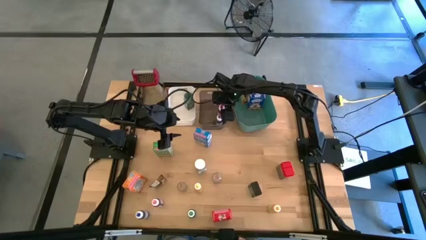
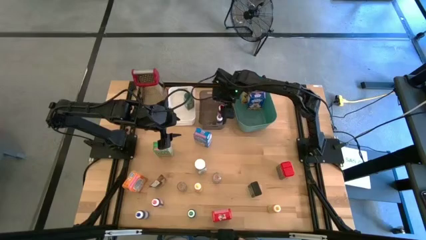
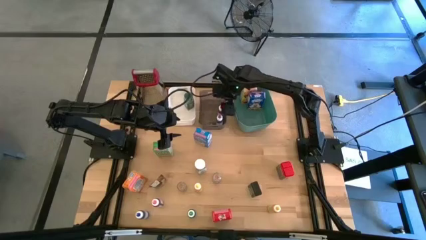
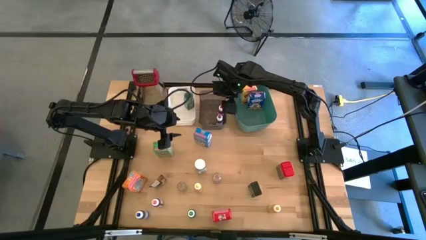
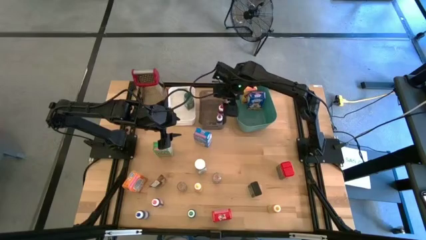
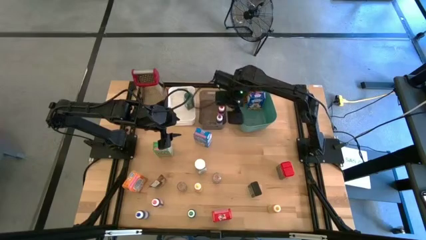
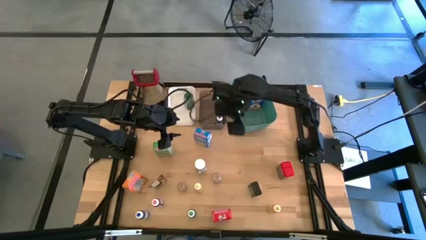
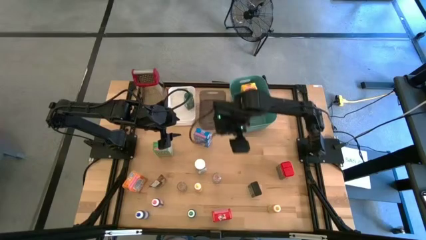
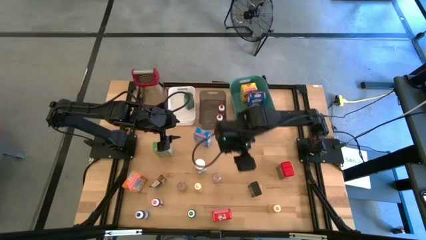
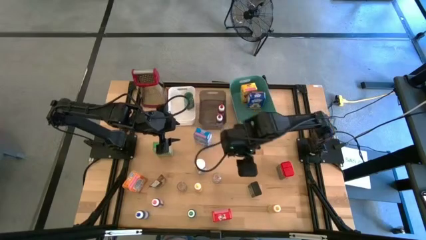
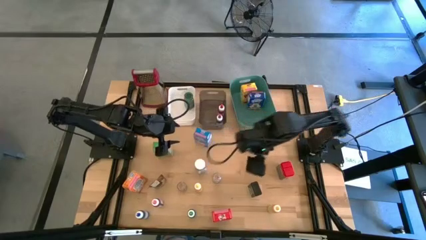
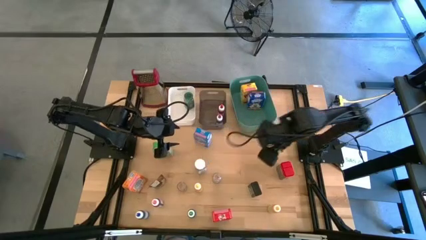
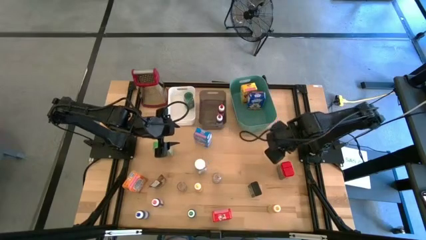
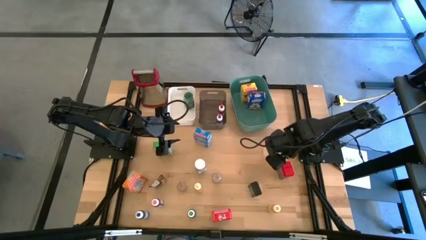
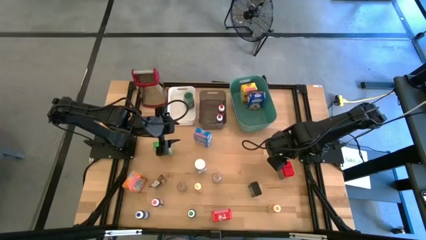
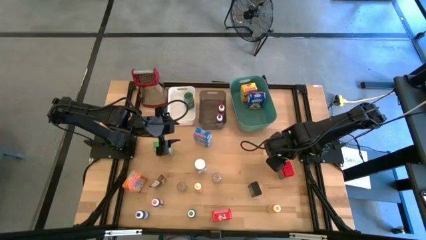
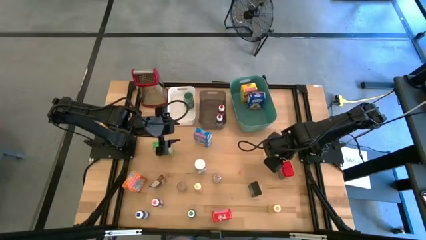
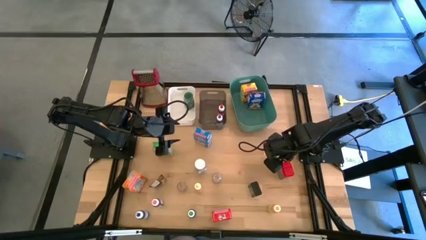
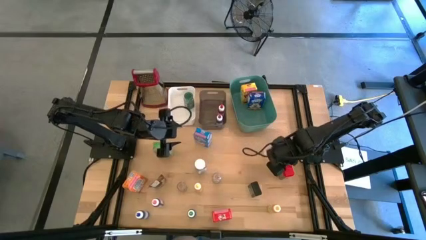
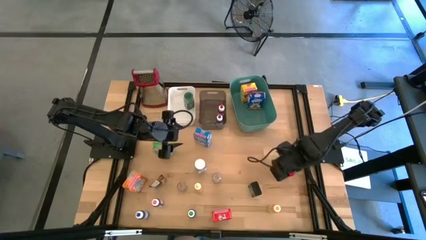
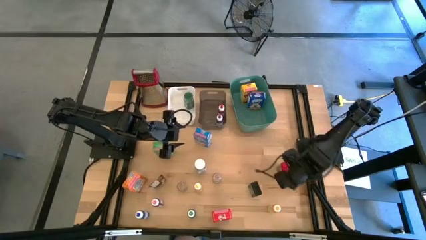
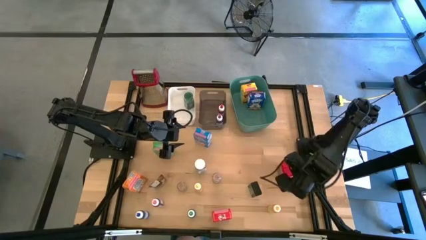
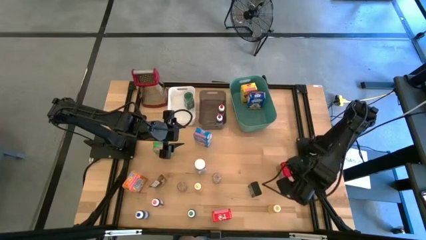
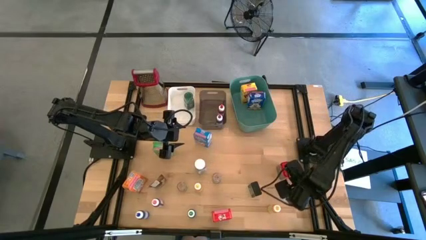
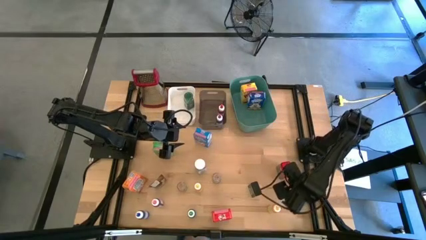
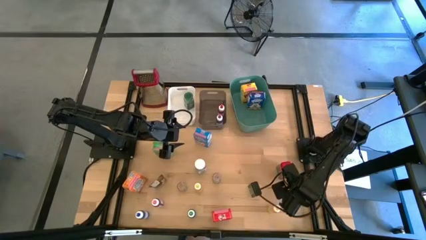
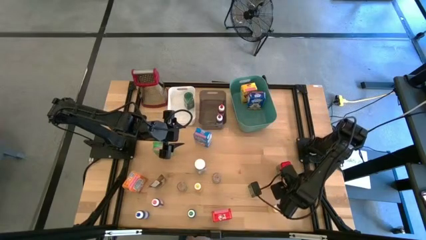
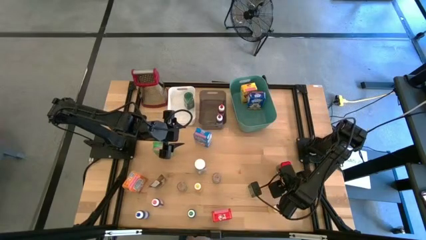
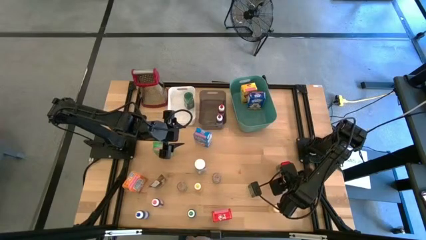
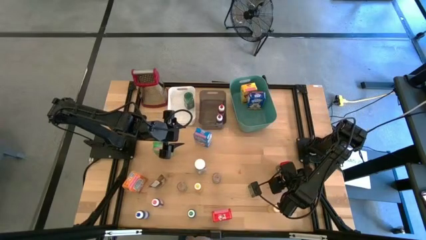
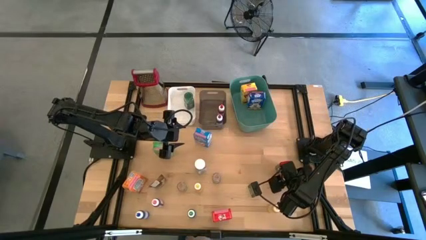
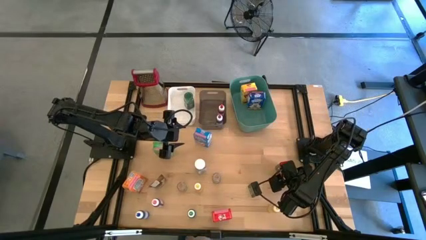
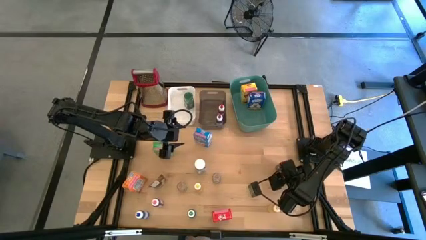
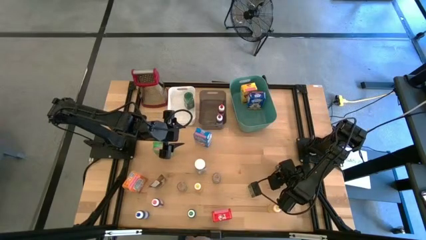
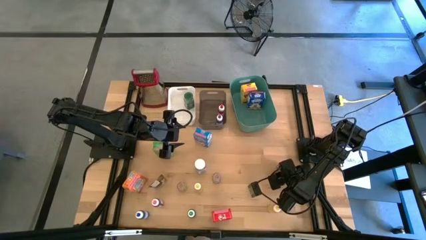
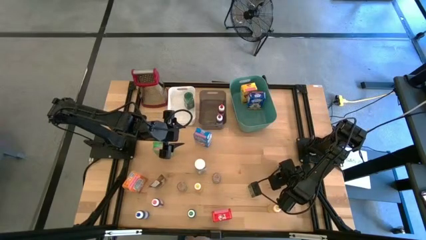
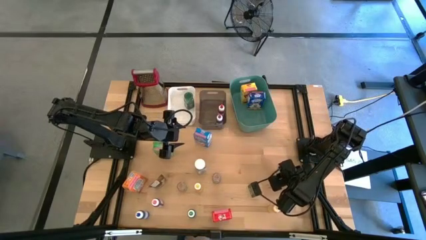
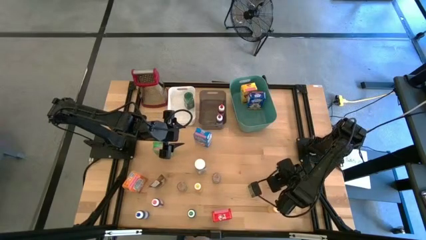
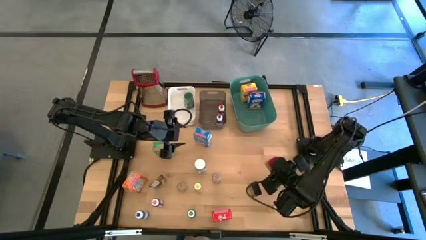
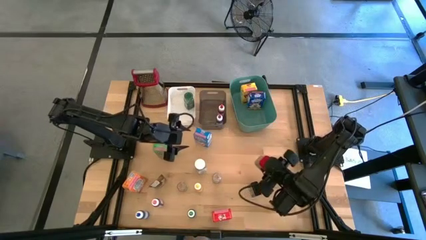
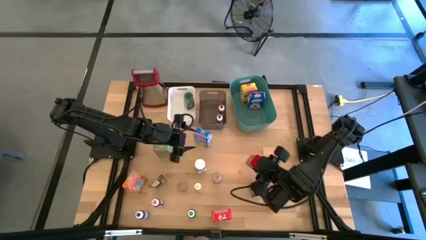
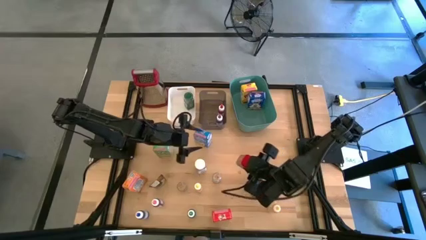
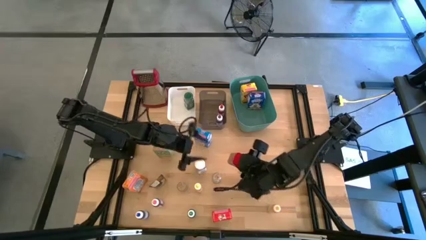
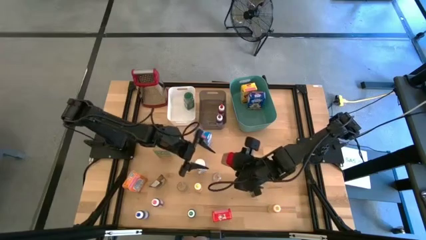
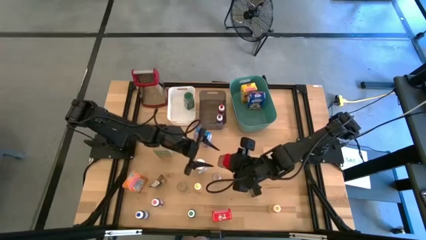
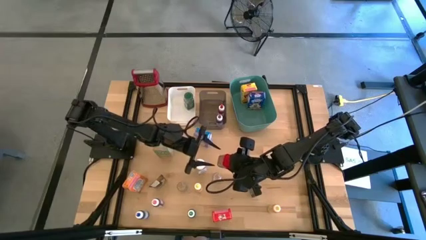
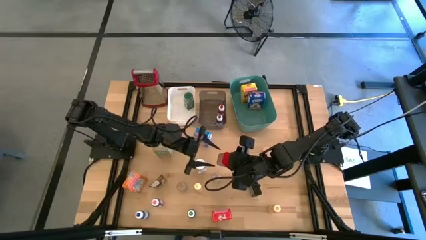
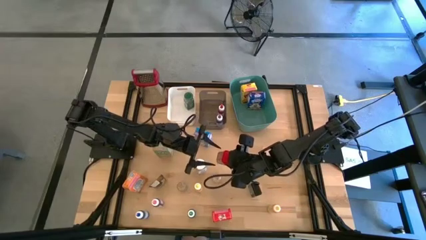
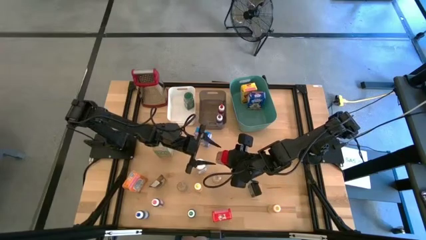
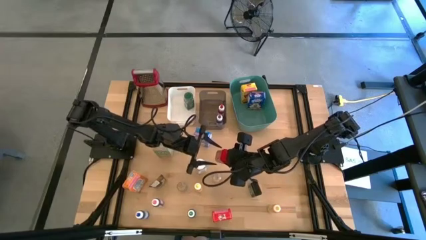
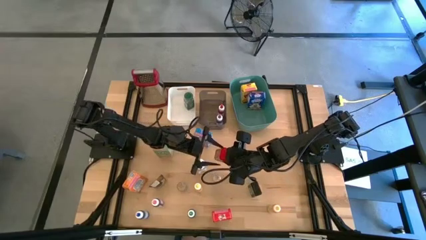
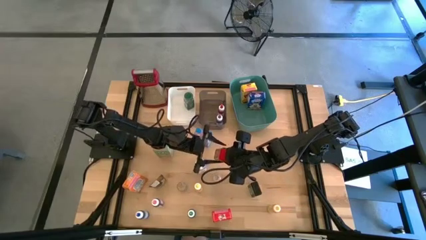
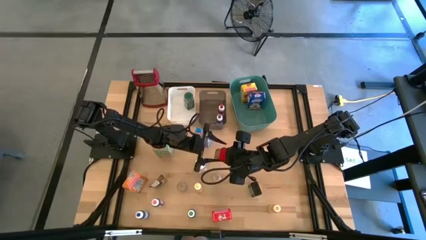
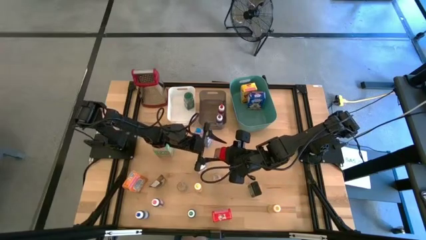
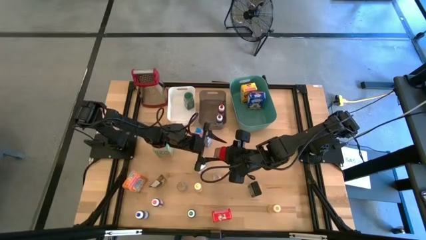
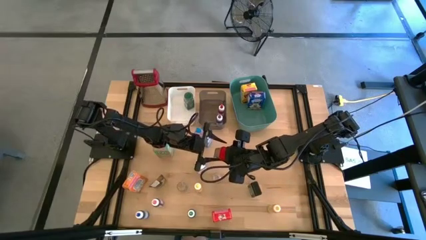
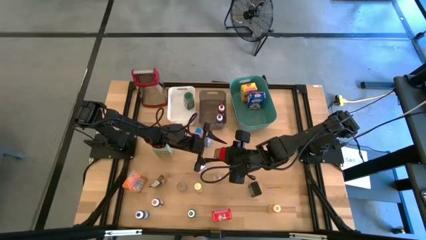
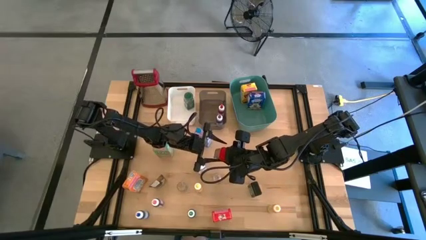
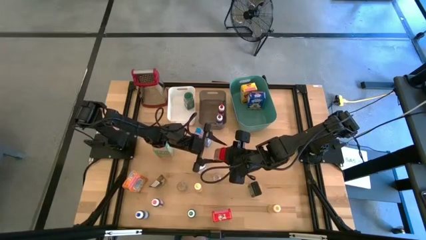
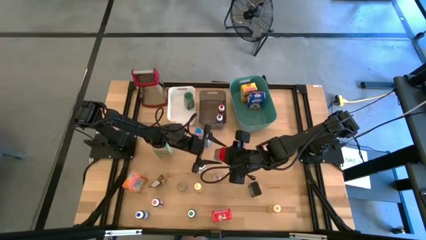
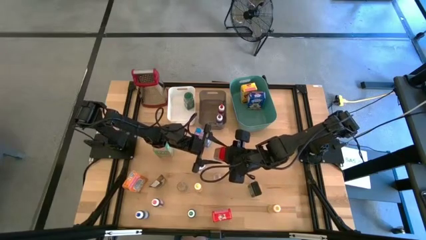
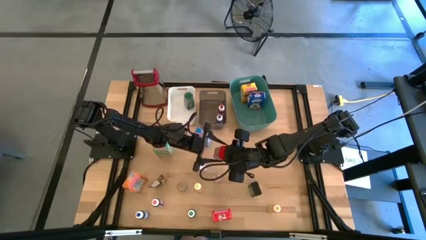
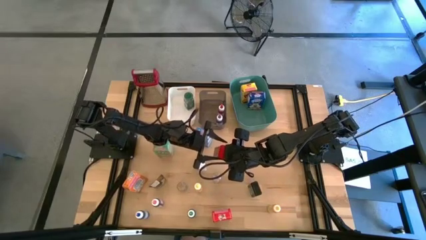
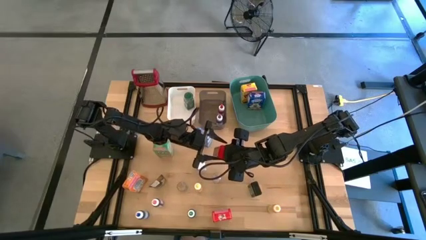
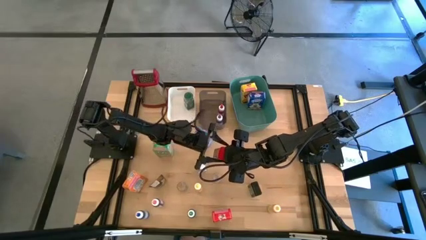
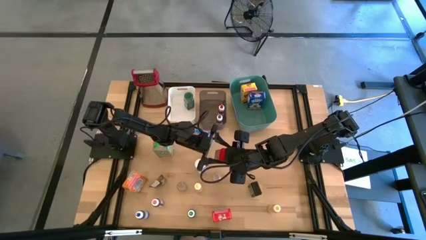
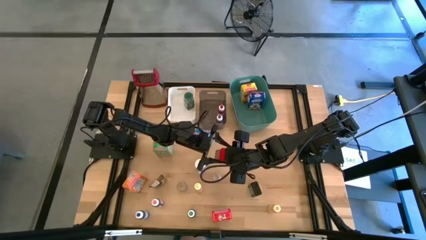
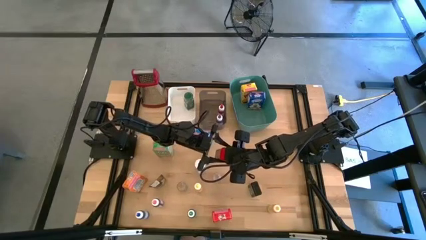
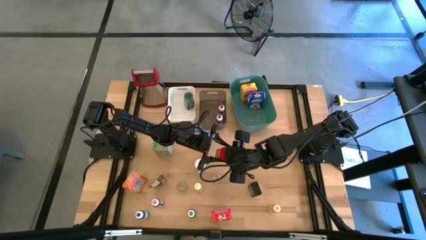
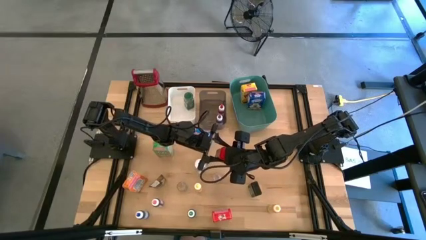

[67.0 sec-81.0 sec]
Task: Pick & Place Kitchen Items
Put the red spice can into the left white bin

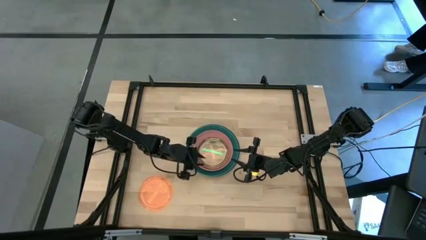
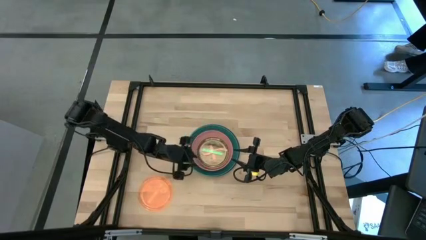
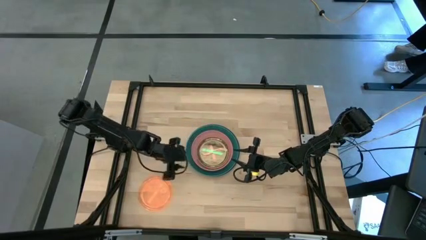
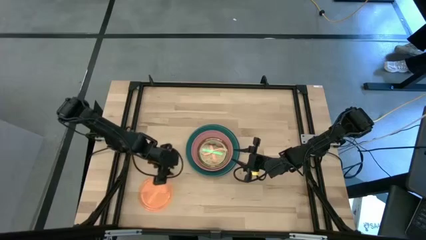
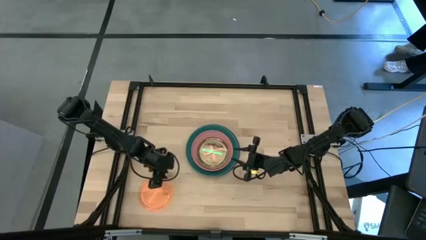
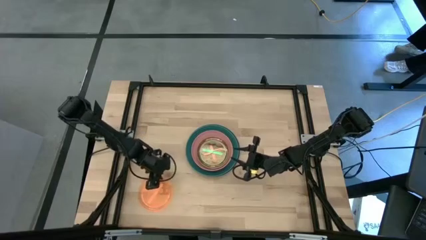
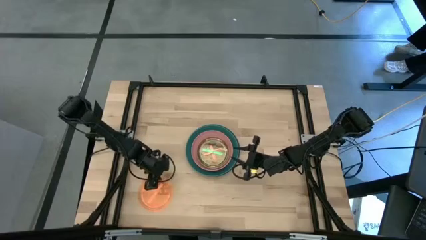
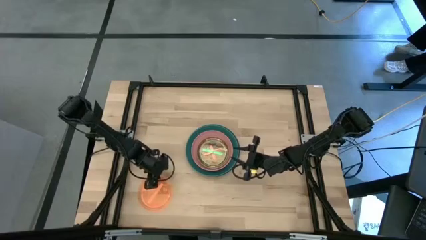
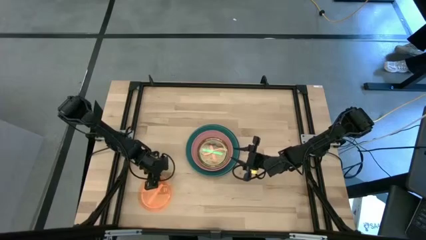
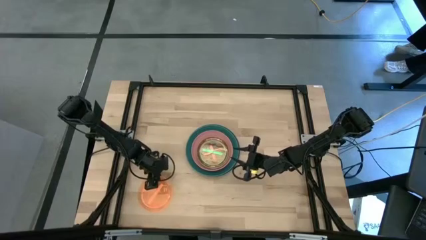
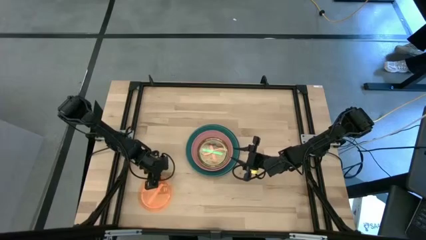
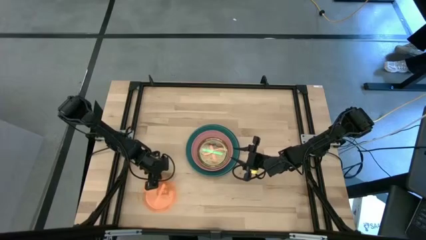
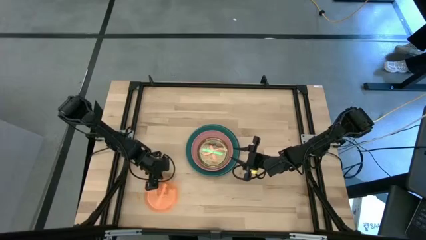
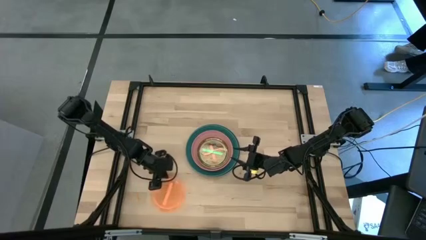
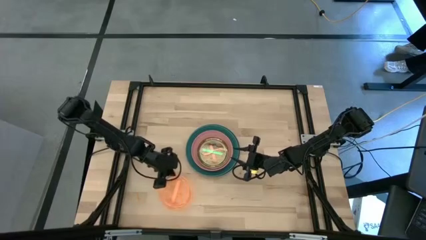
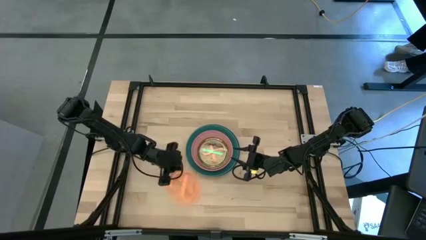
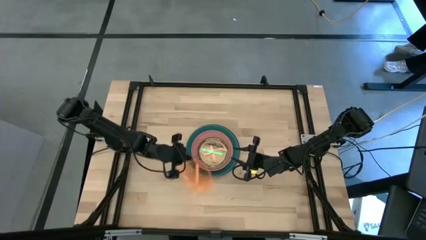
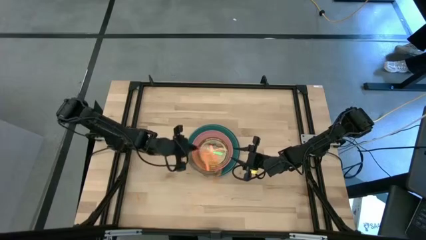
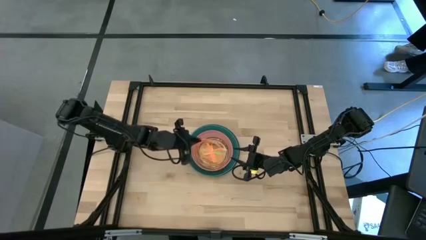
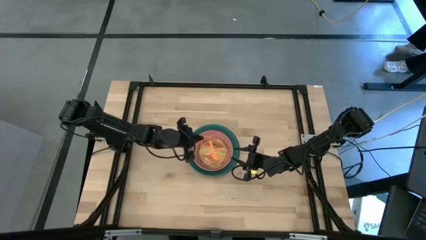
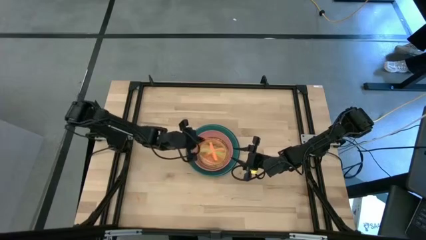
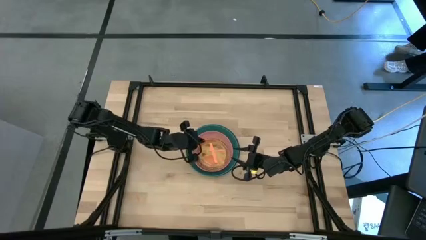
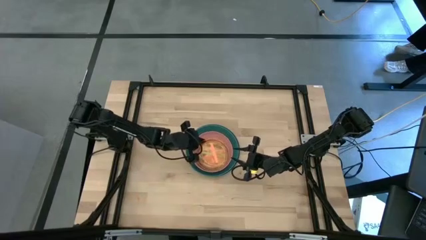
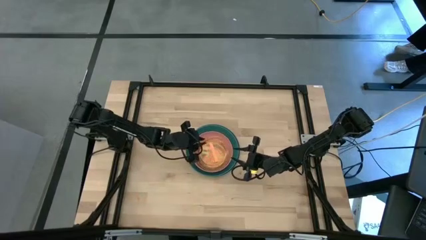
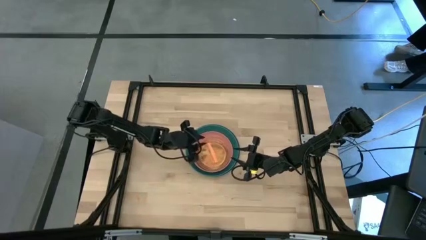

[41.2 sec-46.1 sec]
Task: Stack plastic plates
Stack the orange plate on top of the light green plate
